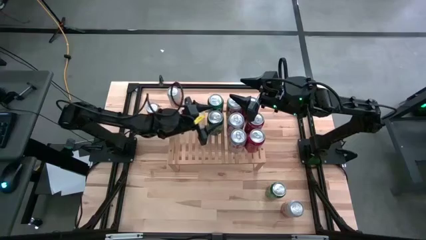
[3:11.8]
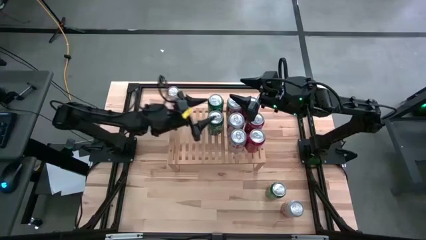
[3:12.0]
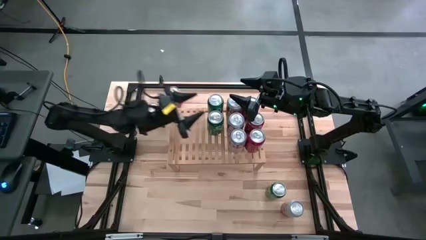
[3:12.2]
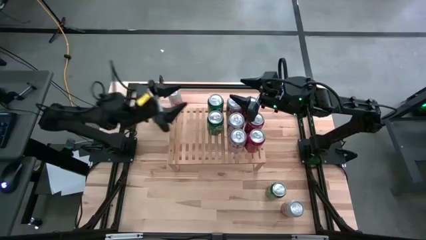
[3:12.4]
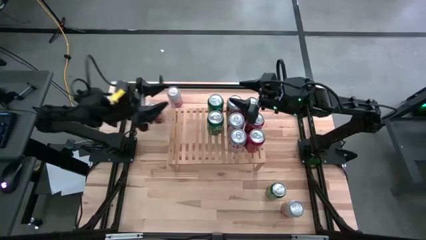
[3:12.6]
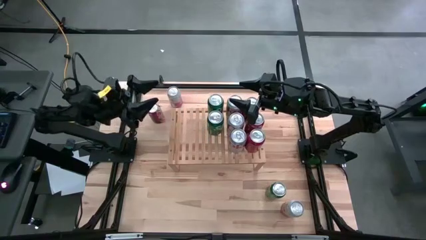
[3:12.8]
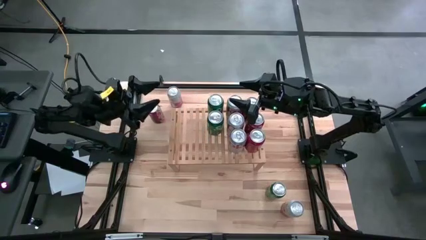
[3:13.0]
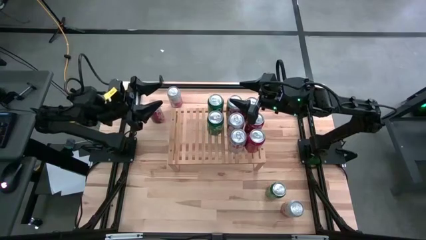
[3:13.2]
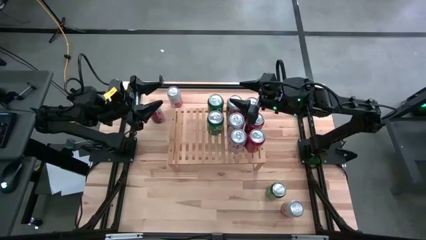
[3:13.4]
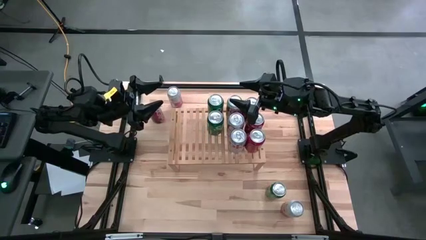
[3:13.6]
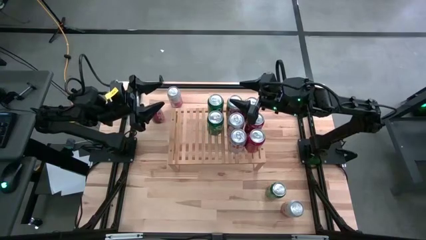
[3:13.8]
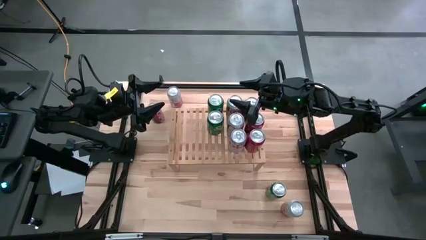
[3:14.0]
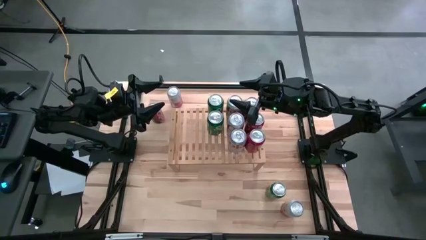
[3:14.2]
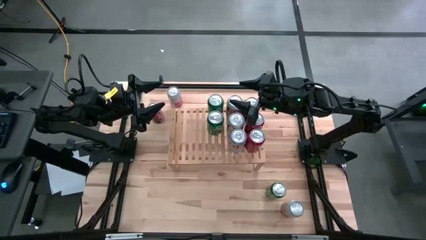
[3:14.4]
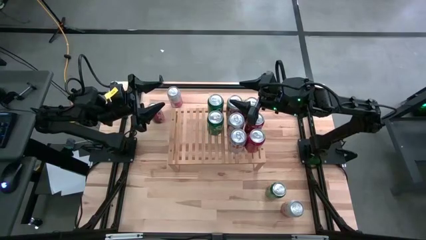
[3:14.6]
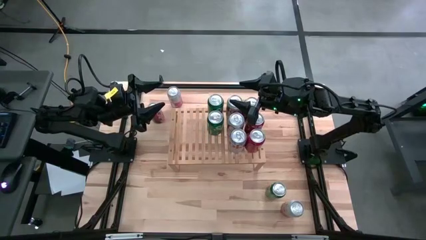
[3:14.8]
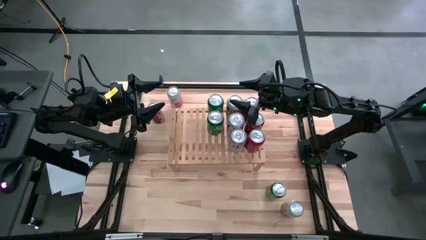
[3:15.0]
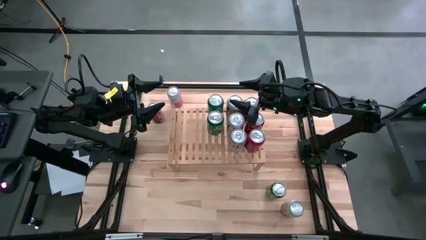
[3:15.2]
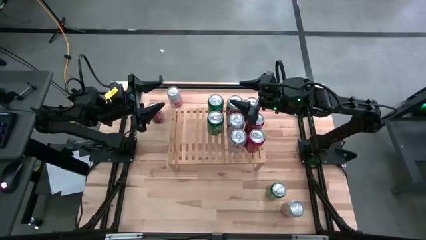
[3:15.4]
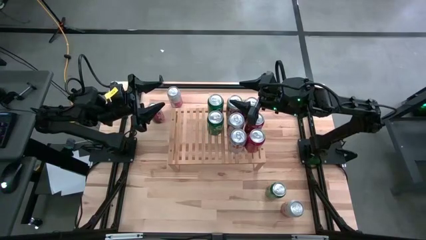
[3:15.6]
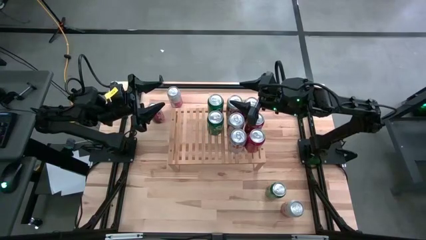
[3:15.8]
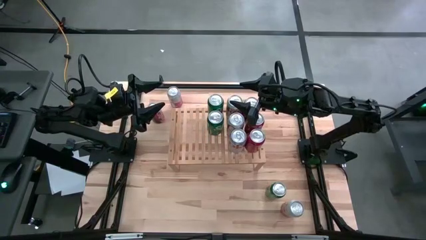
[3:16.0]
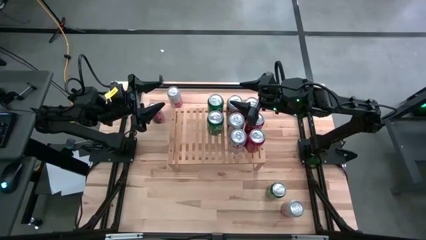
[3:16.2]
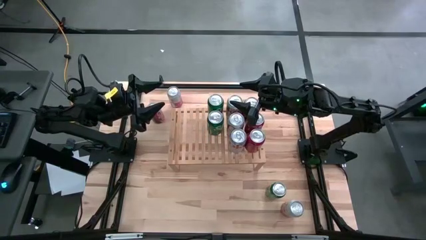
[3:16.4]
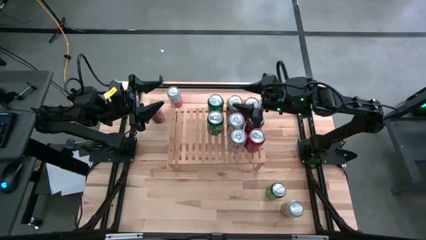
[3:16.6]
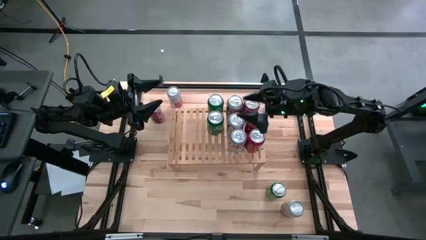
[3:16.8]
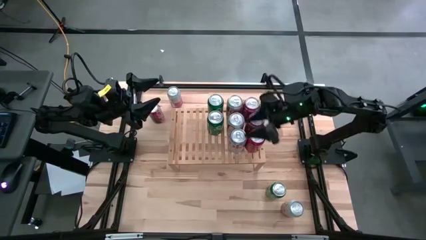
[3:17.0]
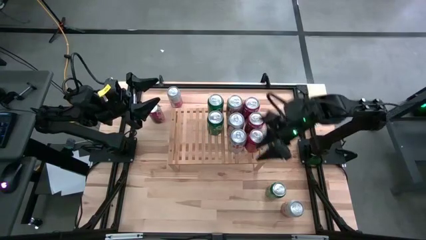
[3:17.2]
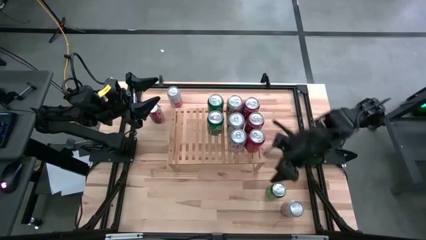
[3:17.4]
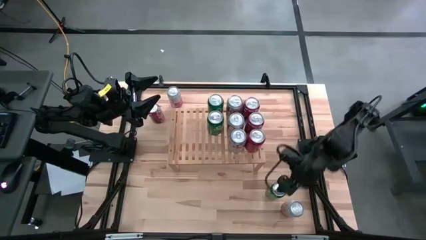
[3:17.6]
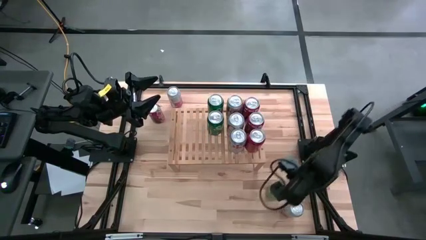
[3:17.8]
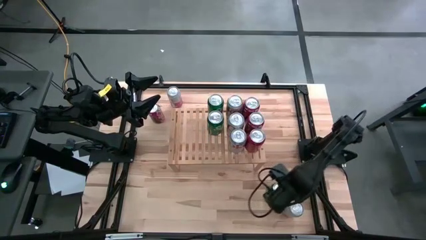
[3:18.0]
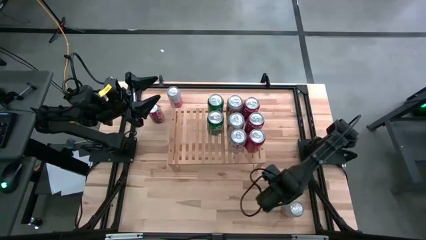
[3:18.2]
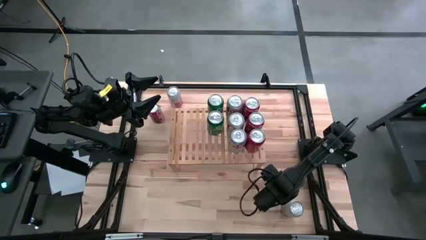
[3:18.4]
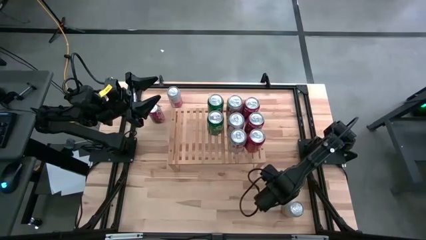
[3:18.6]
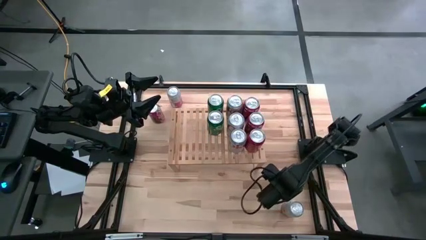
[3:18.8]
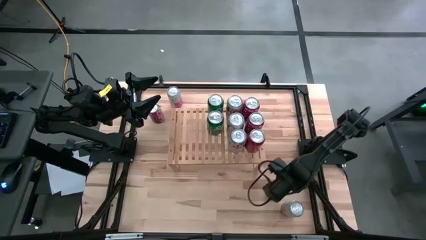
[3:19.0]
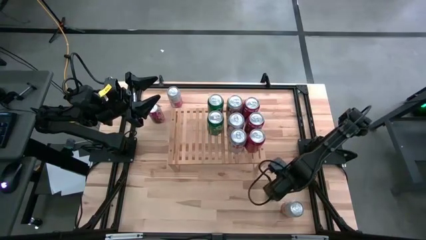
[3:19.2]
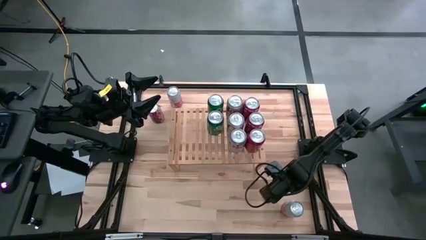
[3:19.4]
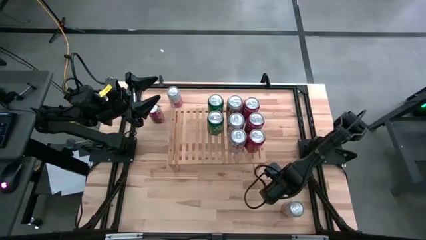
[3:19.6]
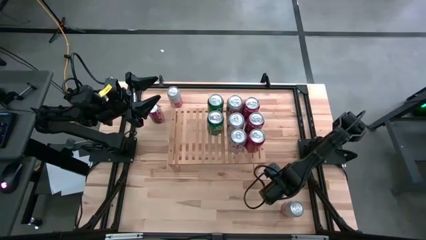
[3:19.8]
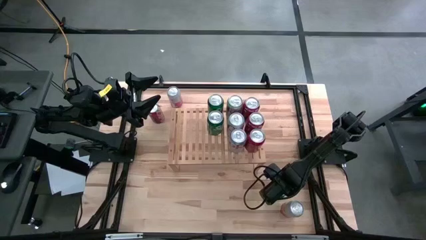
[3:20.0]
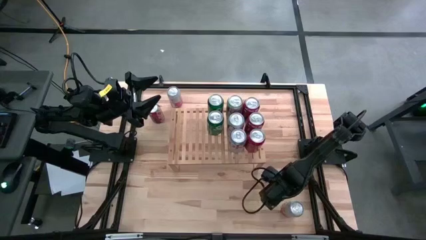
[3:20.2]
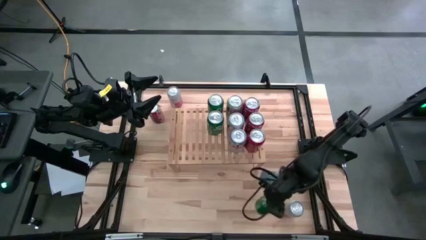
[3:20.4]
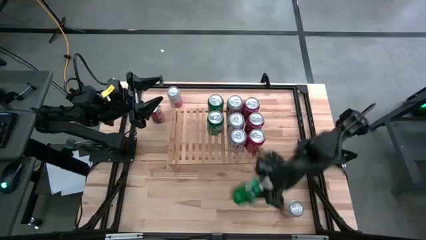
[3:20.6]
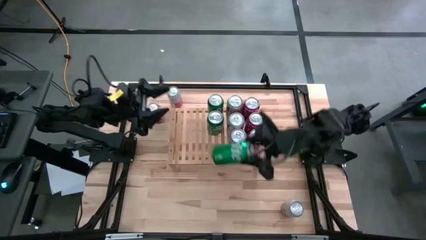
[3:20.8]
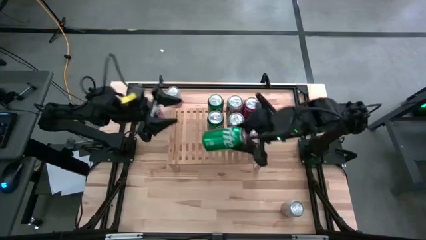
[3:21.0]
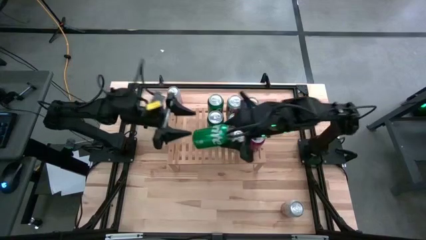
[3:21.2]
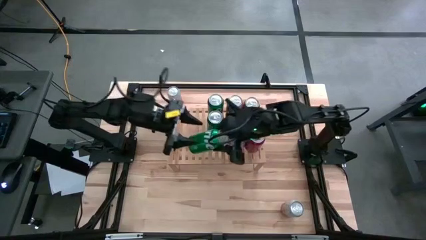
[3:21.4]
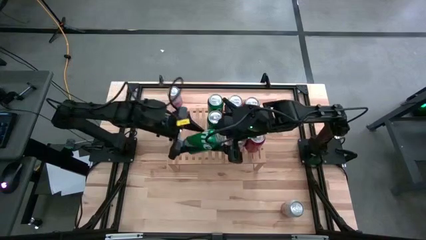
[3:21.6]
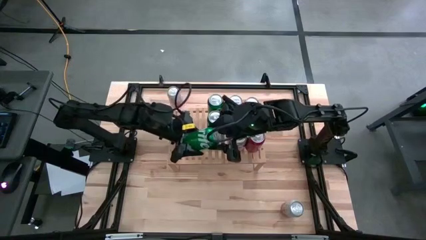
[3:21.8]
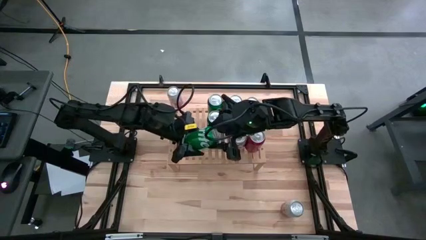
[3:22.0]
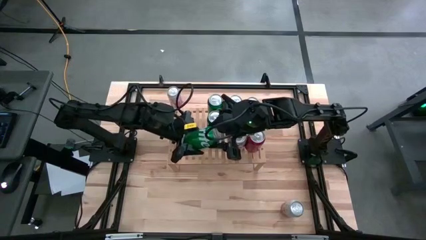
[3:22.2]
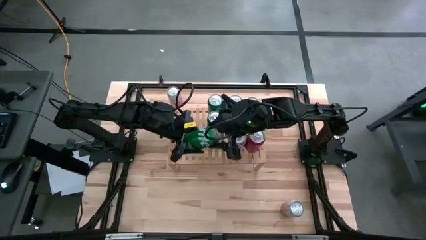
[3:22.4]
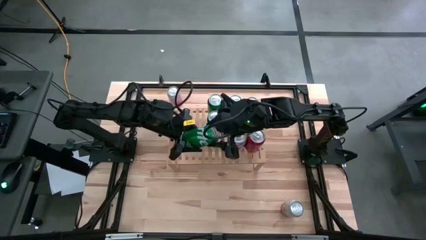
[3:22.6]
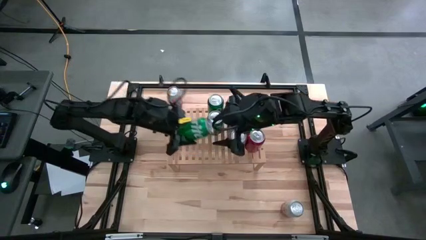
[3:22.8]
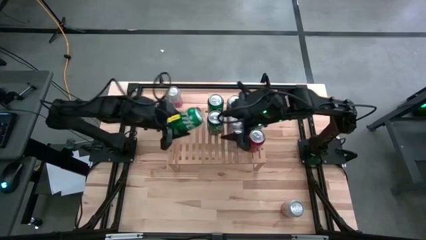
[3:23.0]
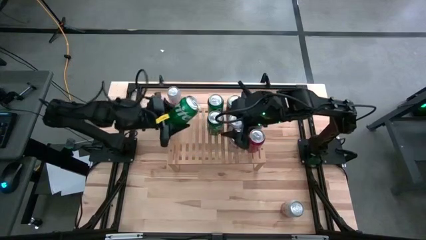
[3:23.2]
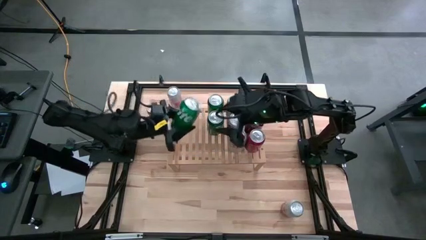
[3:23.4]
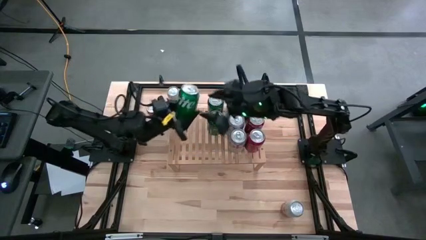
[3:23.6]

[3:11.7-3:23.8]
Task: Place canned beverage on shelf
Put the green soda can on the shelf

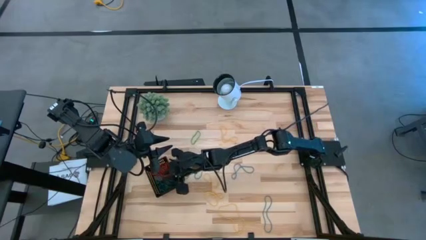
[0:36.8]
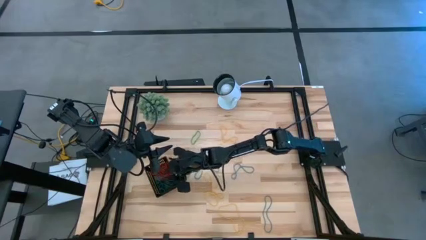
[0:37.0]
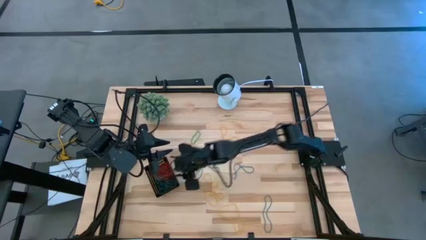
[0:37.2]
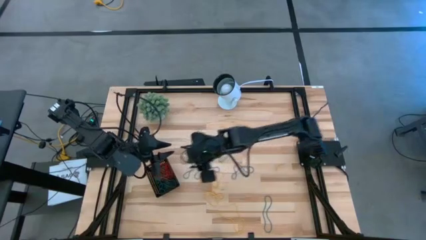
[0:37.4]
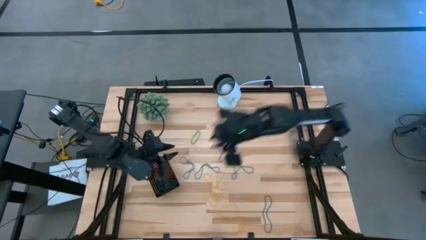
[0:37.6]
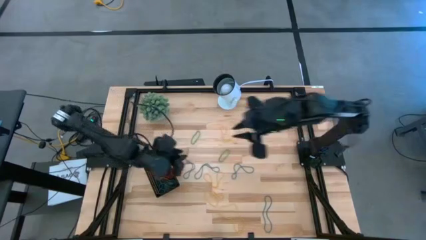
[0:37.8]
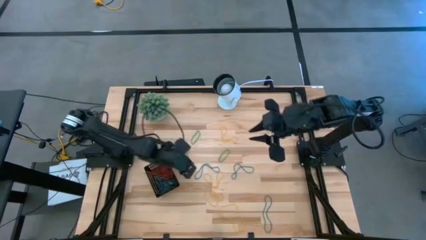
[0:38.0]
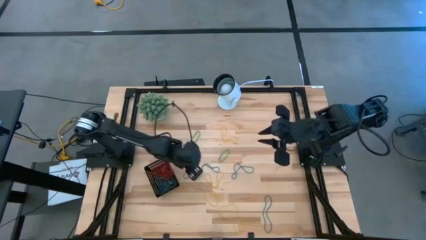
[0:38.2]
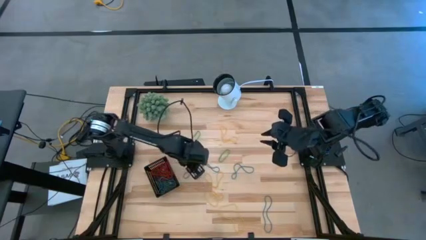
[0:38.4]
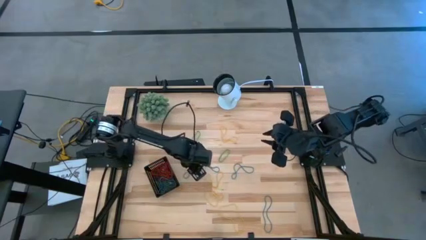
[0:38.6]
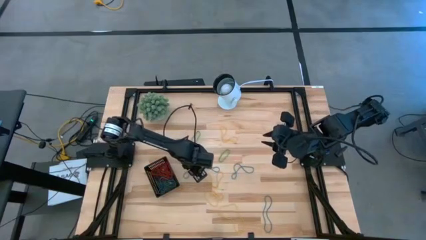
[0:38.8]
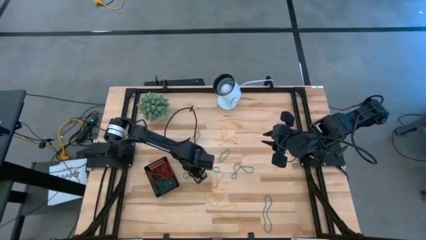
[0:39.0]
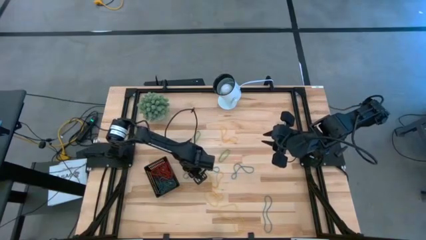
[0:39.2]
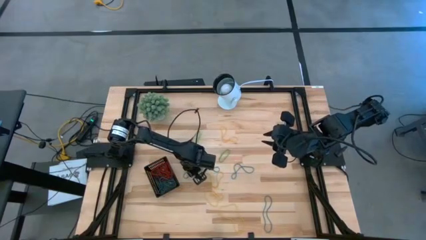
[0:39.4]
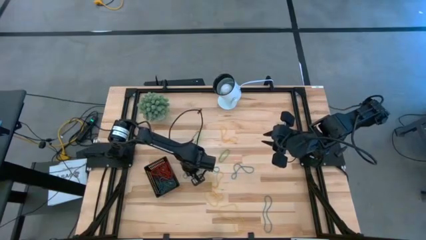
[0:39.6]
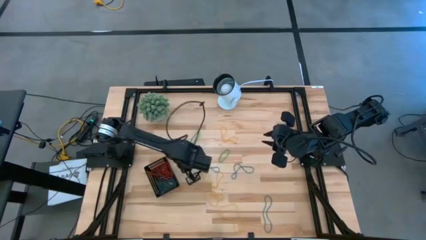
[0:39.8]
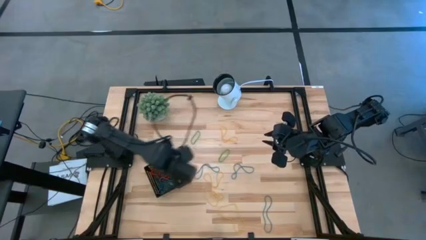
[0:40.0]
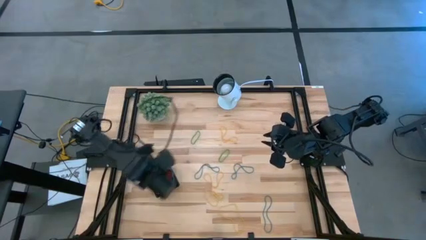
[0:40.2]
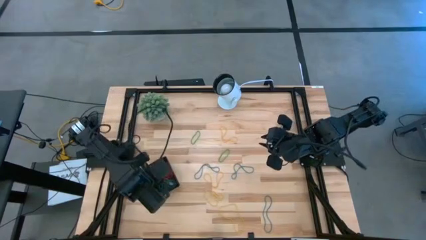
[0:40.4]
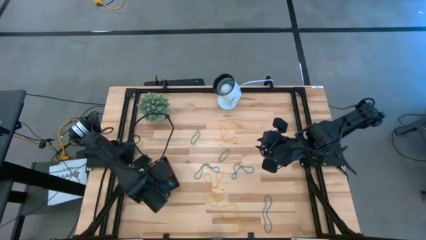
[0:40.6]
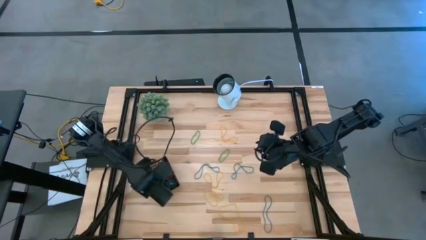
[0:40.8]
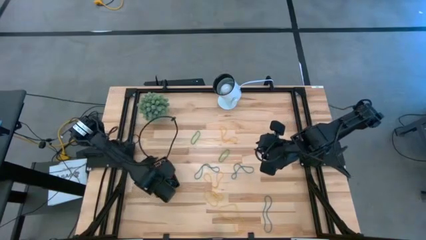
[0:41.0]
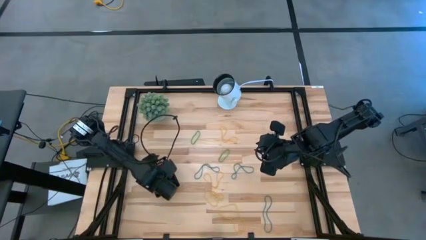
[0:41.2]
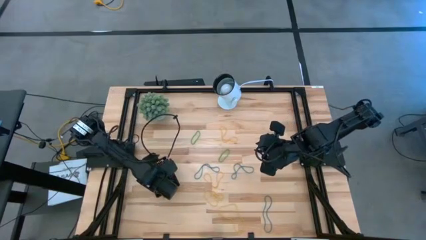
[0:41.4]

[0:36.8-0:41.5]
Task: Pick and place items into bin
Put the blue rubber band into the black bin
